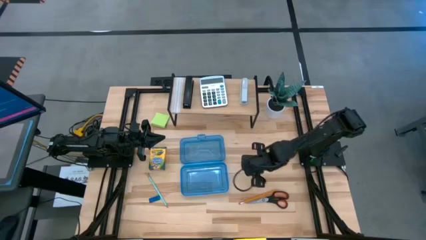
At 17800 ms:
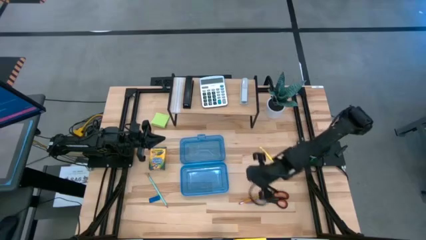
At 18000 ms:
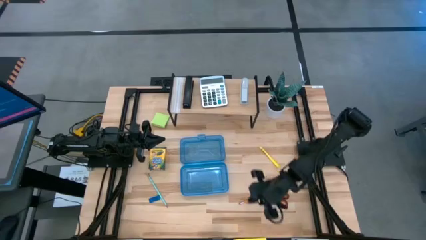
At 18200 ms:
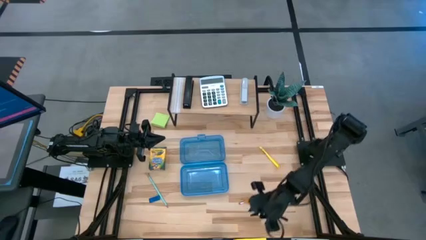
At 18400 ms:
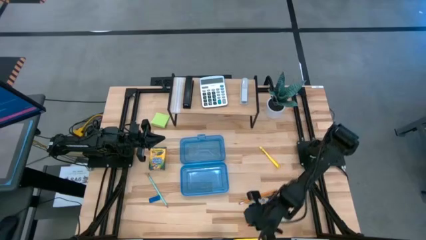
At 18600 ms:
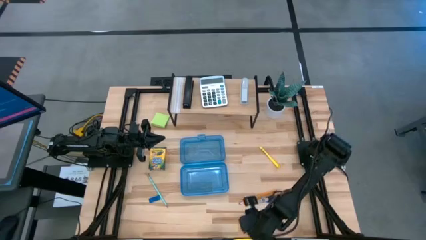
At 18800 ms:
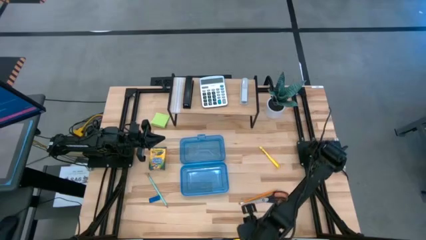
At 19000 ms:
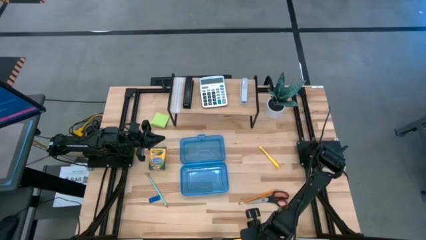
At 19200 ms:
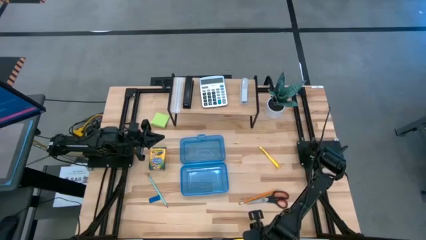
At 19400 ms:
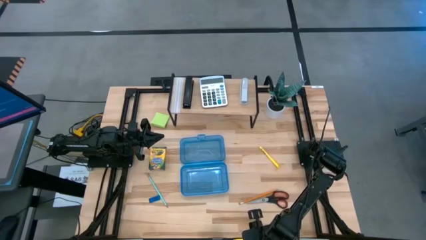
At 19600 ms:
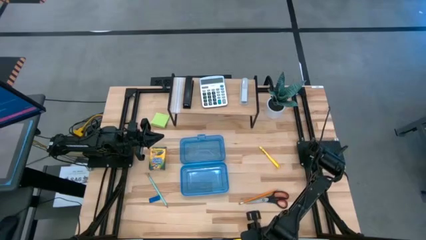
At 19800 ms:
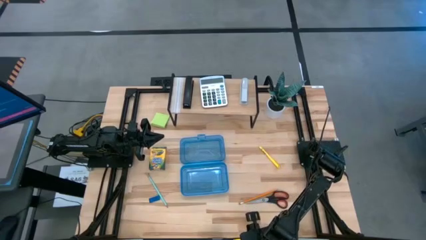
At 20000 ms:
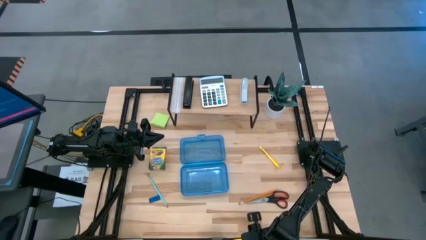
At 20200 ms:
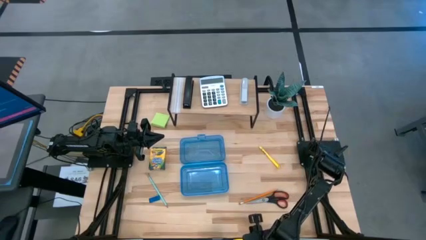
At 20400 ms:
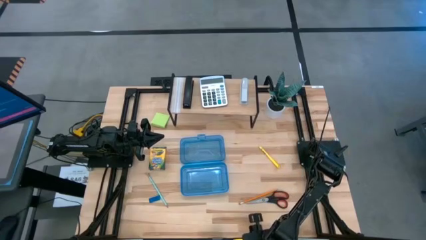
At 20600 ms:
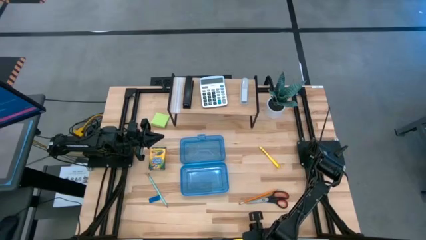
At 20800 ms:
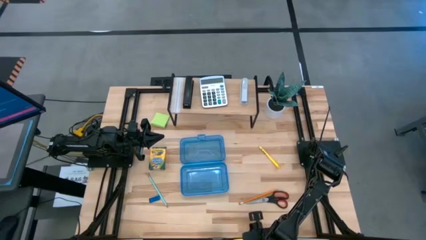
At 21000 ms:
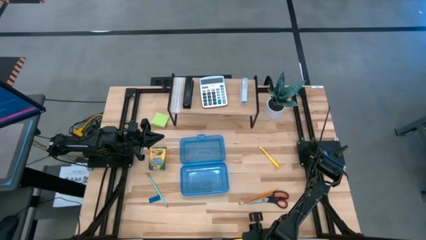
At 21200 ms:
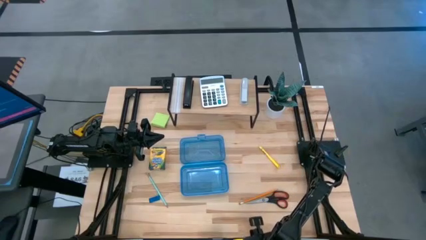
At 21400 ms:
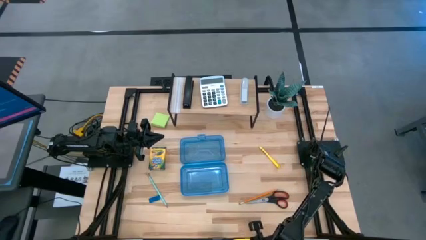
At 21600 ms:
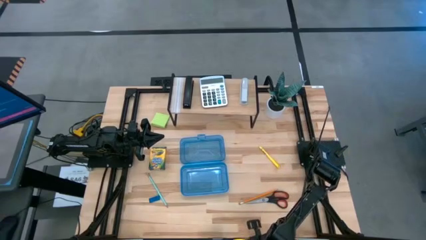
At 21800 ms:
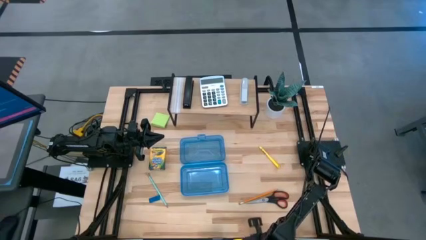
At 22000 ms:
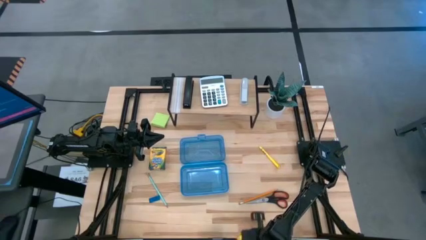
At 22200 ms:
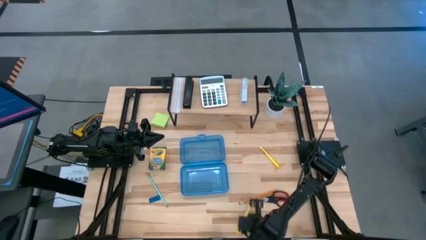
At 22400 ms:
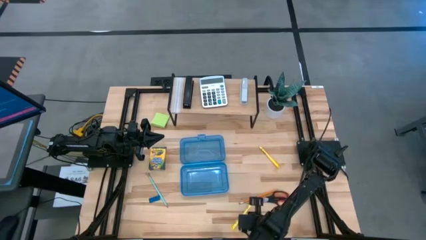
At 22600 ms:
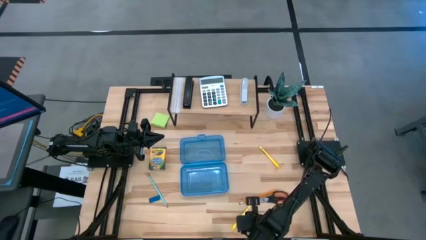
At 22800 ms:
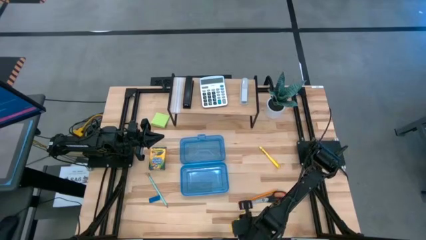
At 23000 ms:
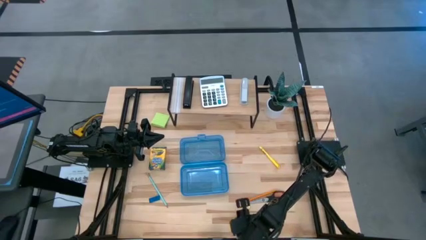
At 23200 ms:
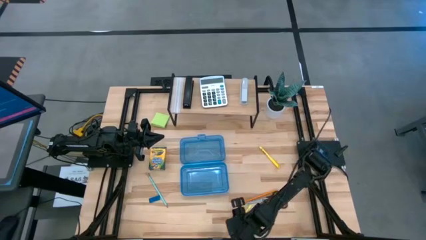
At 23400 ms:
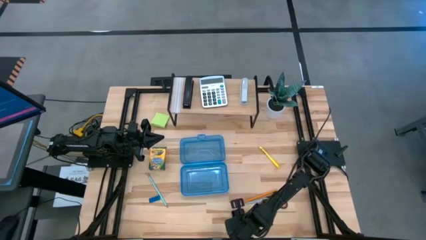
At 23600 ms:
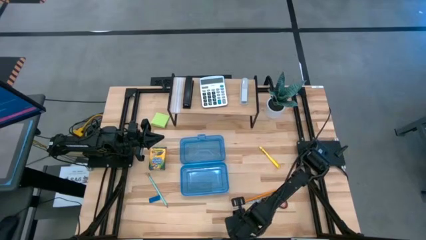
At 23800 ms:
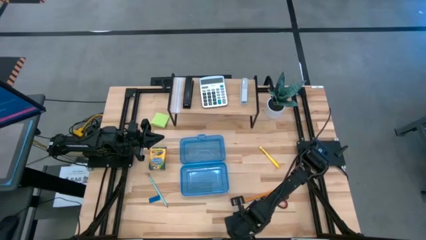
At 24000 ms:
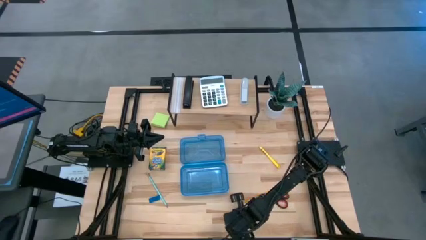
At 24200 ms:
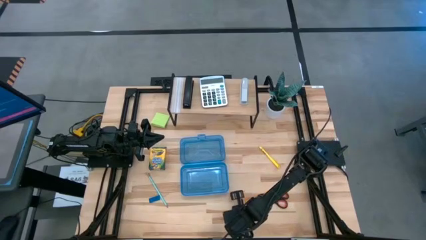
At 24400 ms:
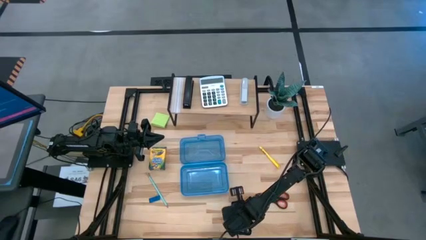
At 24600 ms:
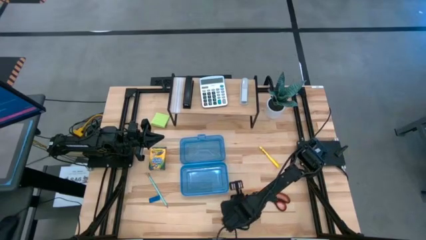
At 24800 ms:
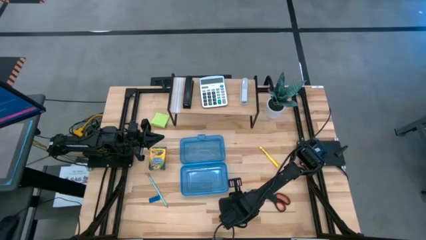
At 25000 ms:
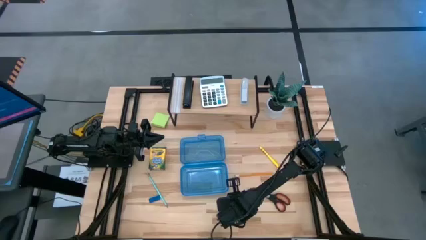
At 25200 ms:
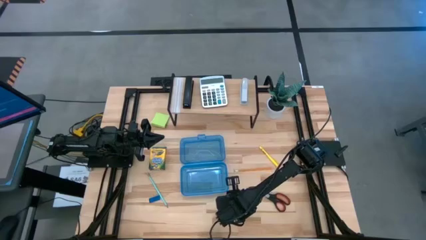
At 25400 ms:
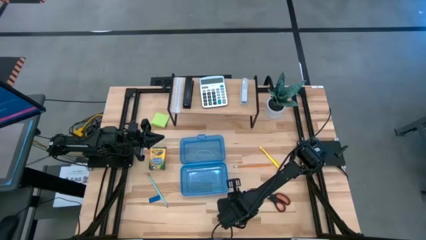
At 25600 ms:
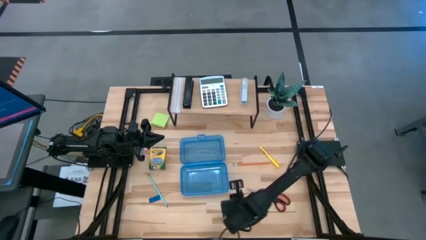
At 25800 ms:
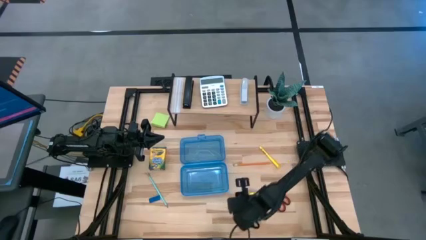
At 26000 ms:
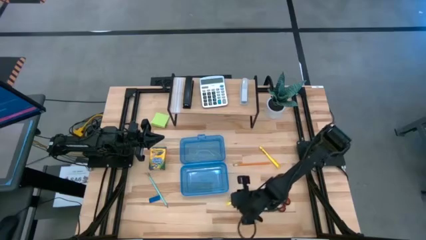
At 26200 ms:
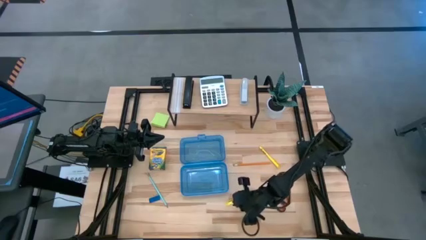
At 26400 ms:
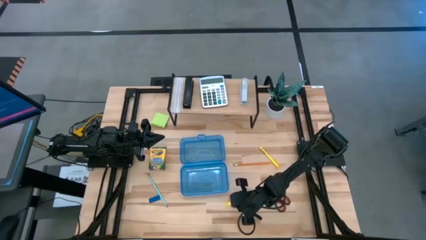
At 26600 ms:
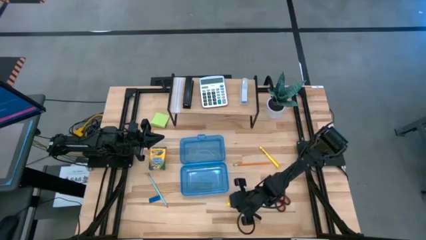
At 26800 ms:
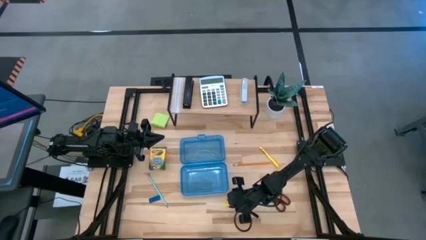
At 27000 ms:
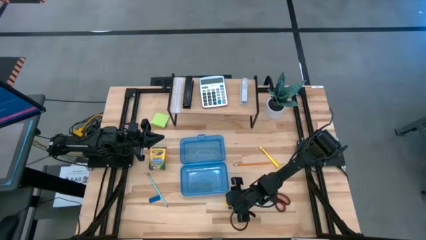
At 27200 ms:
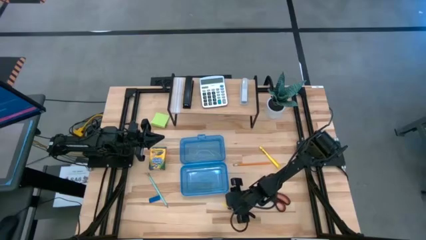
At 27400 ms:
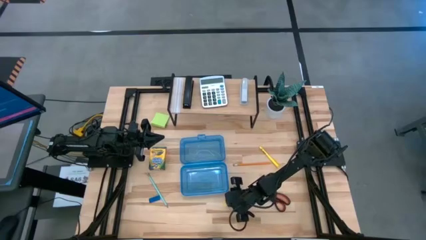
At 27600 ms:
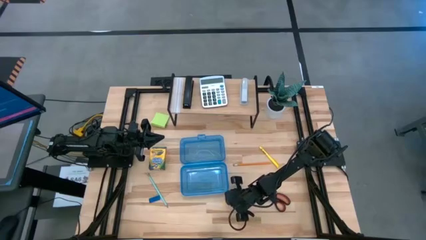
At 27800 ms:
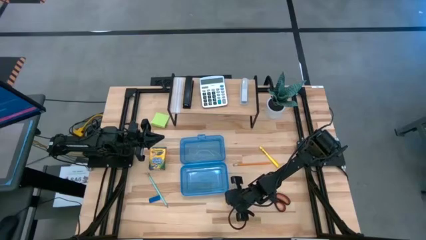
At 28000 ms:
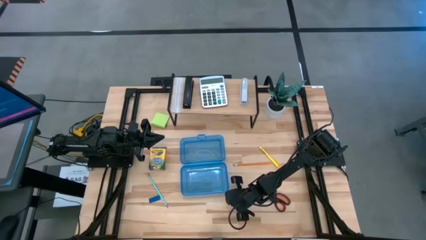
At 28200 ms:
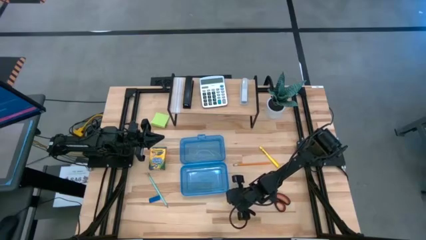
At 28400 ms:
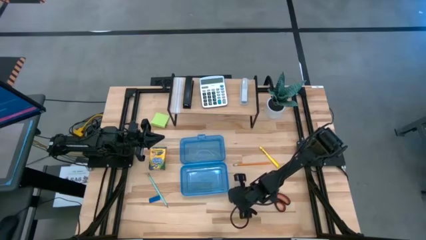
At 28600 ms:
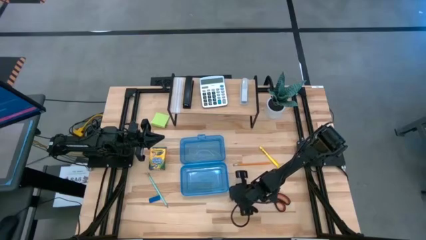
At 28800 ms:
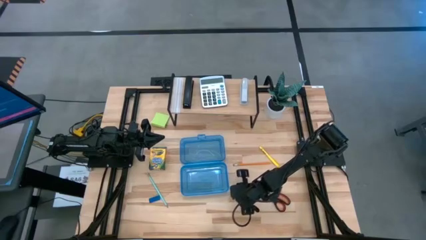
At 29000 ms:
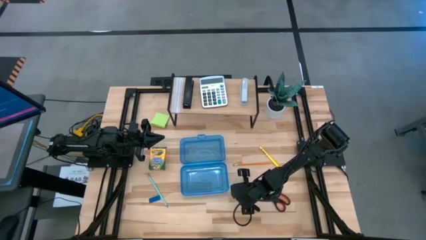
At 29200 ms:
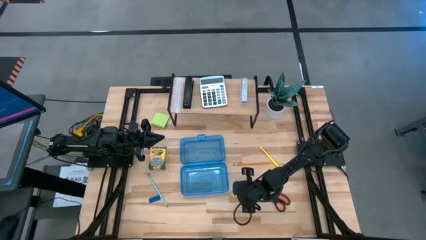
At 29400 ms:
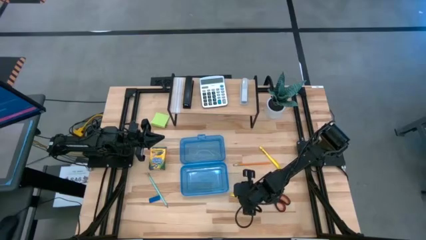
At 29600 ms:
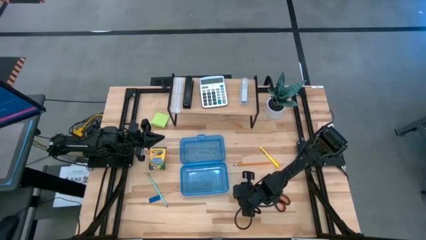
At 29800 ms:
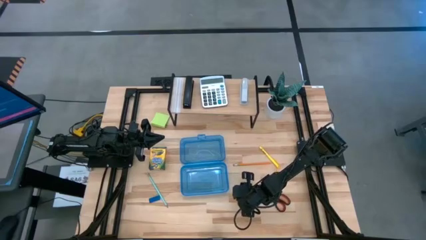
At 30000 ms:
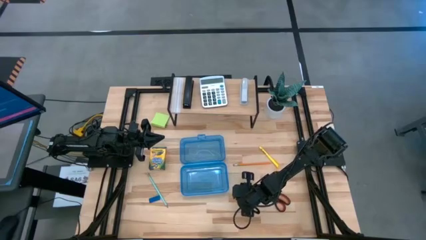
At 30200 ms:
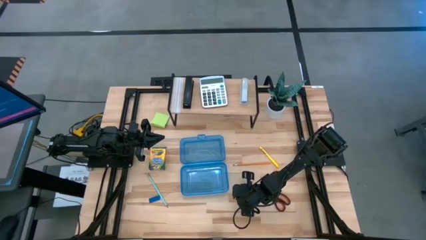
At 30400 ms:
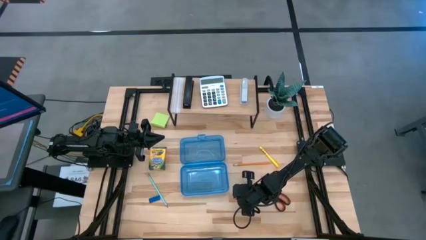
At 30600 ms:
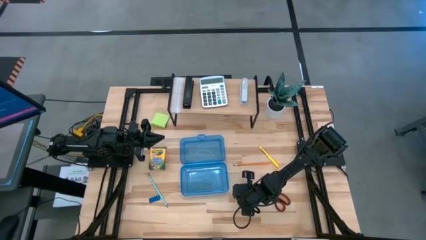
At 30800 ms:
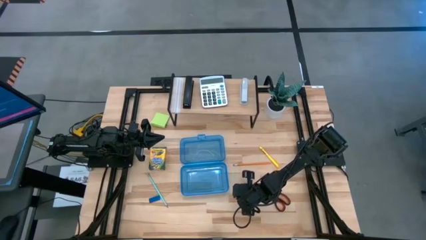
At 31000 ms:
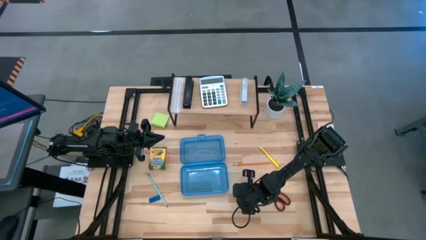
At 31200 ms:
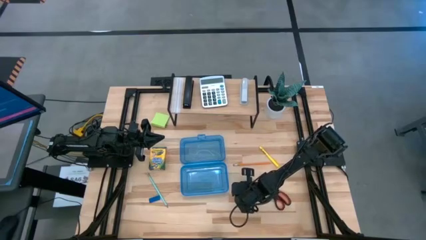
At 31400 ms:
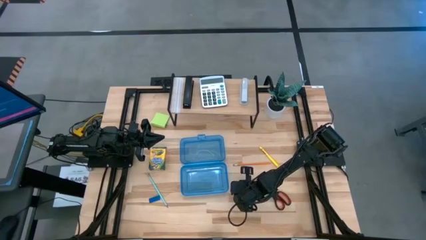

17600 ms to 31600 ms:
Task: Pack school essentials
Put the yellow pen into the blue supply box

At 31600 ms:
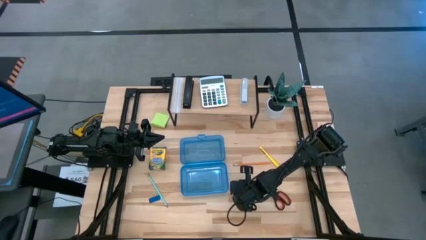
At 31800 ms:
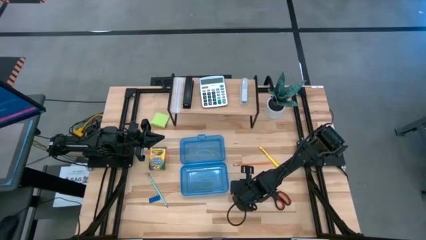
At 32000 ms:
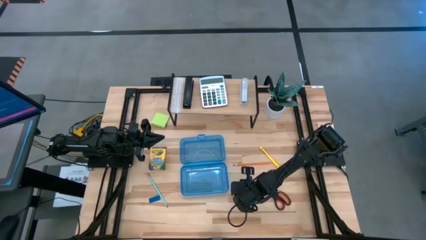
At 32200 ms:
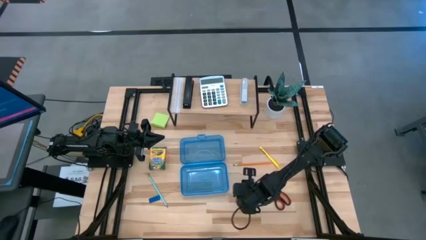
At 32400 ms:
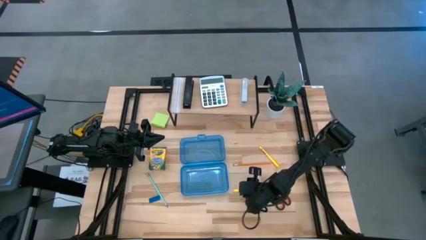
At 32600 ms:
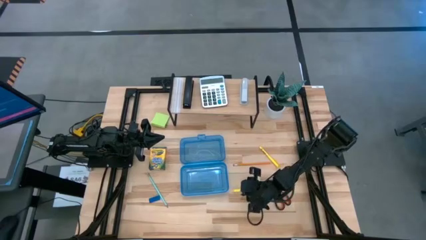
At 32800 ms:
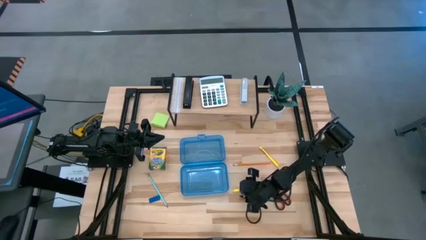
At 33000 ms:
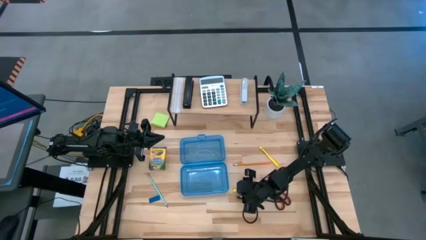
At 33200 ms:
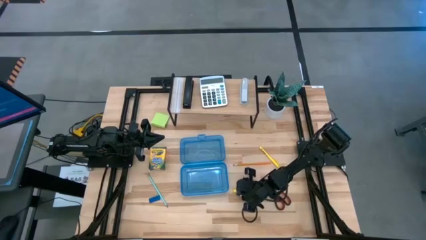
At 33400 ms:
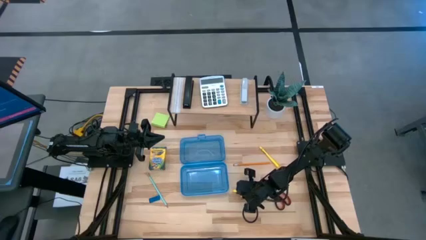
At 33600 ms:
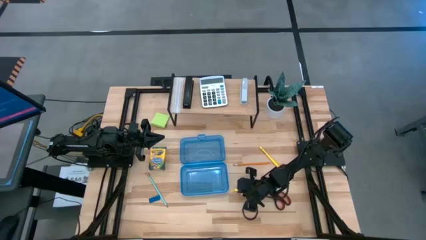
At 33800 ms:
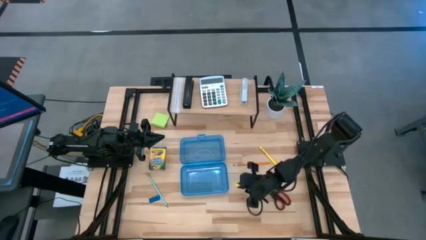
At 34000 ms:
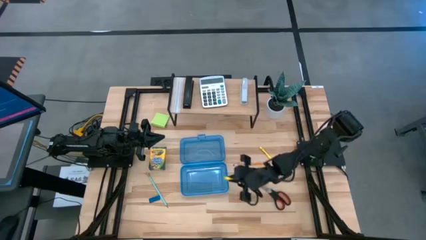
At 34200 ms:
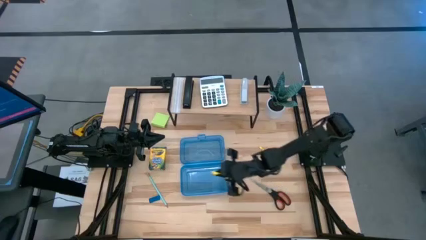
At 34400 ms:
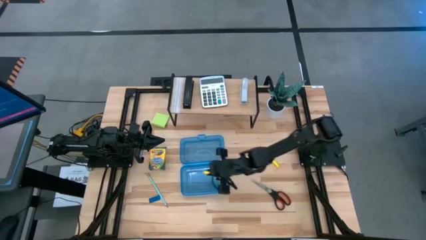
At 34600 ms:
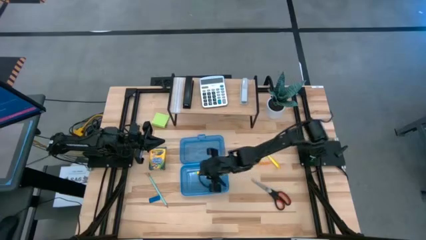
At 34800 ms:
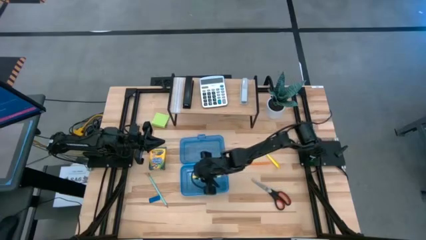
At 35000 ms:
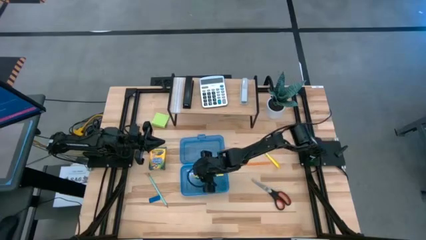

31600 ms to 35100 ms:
Put the yellow pen into the blue supply box
